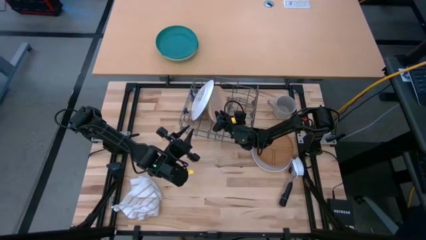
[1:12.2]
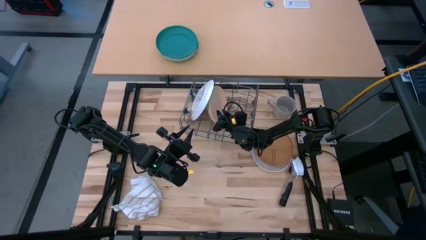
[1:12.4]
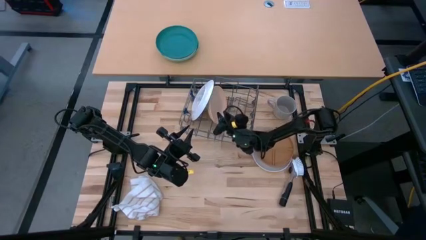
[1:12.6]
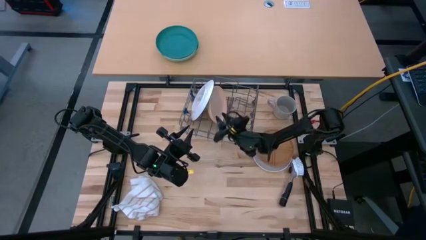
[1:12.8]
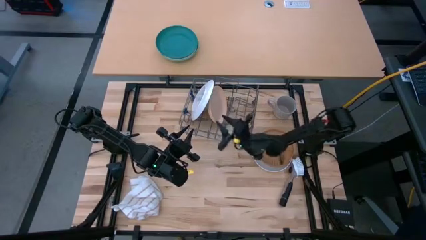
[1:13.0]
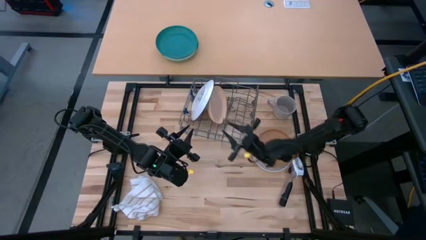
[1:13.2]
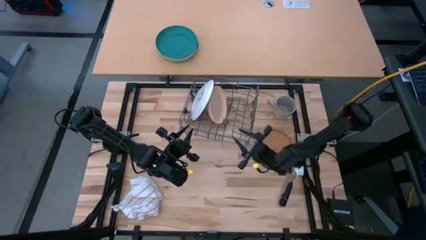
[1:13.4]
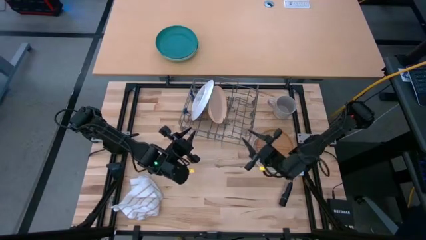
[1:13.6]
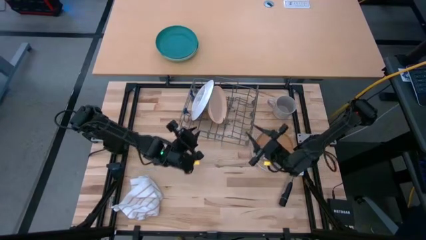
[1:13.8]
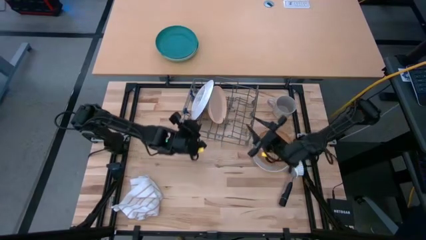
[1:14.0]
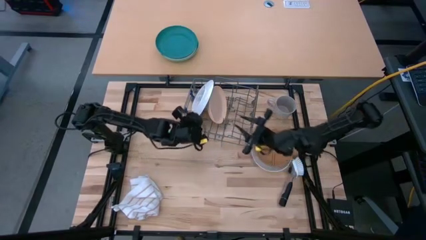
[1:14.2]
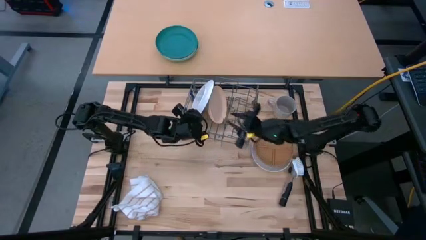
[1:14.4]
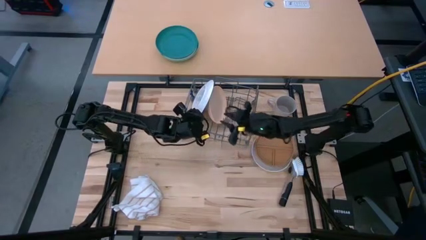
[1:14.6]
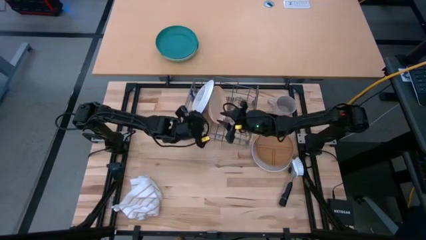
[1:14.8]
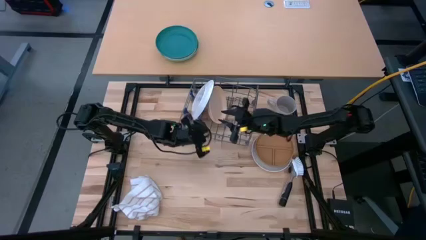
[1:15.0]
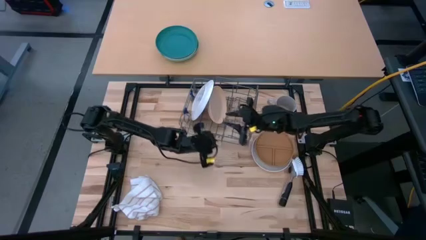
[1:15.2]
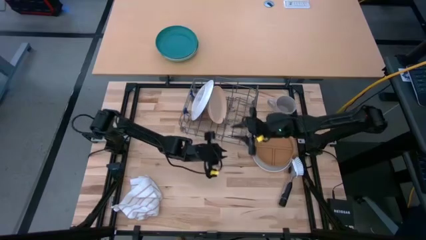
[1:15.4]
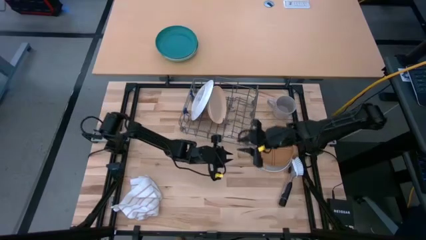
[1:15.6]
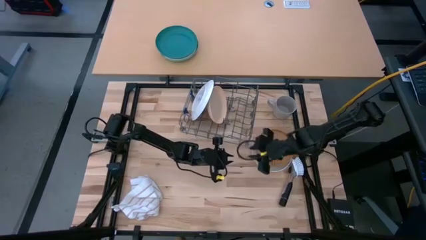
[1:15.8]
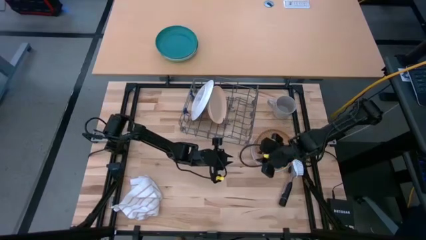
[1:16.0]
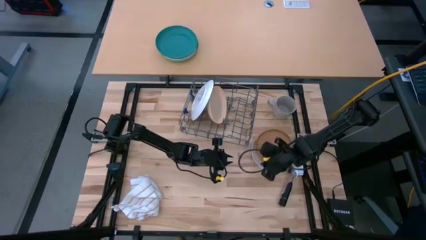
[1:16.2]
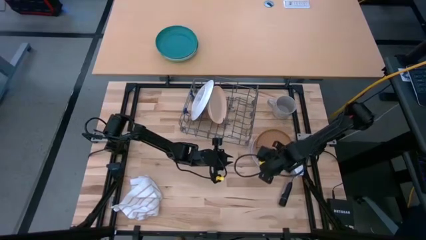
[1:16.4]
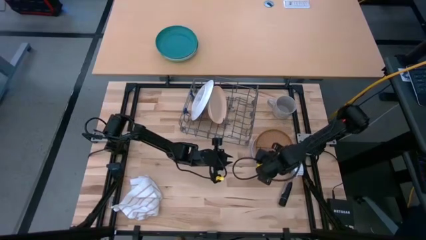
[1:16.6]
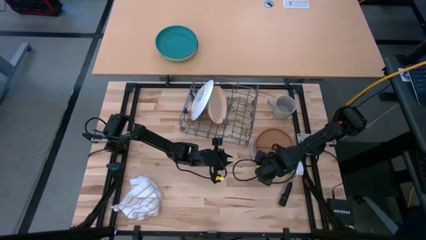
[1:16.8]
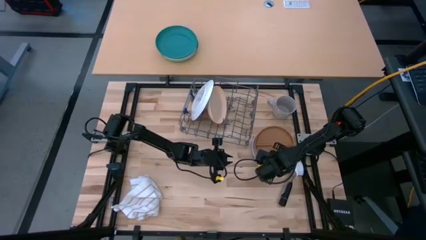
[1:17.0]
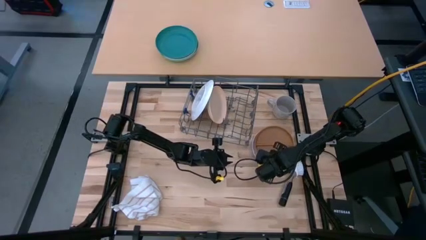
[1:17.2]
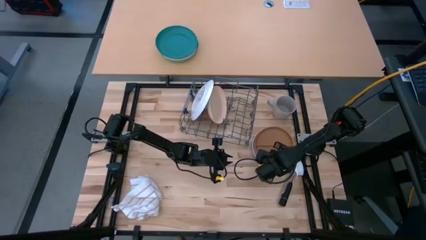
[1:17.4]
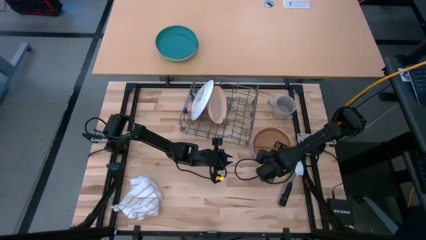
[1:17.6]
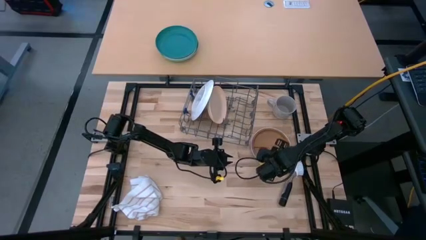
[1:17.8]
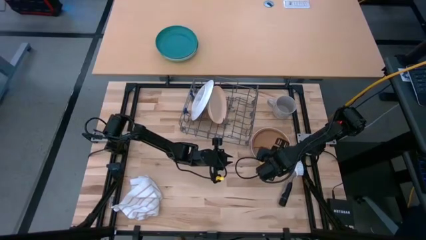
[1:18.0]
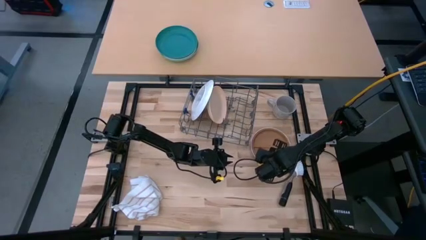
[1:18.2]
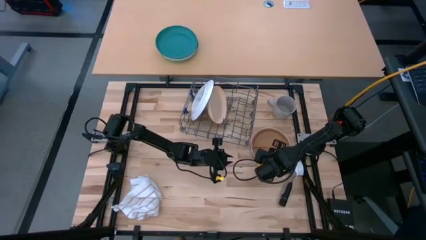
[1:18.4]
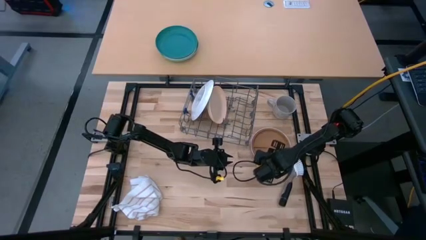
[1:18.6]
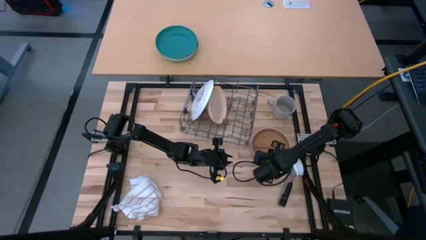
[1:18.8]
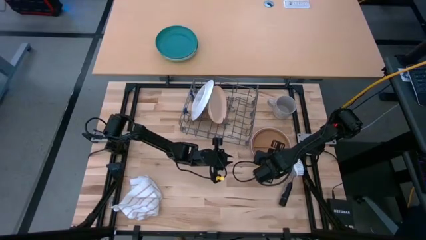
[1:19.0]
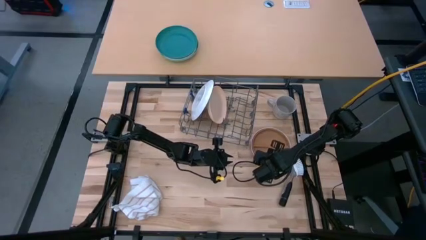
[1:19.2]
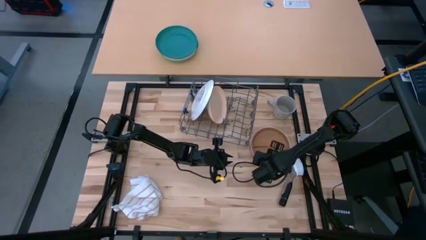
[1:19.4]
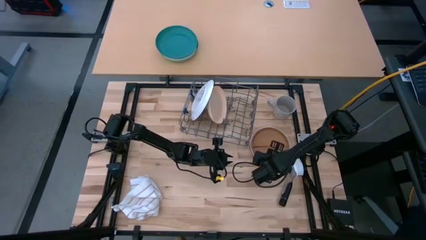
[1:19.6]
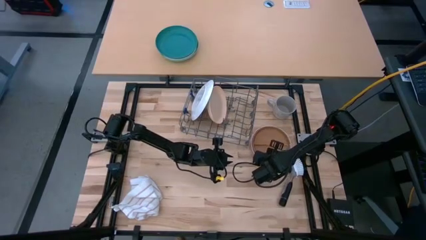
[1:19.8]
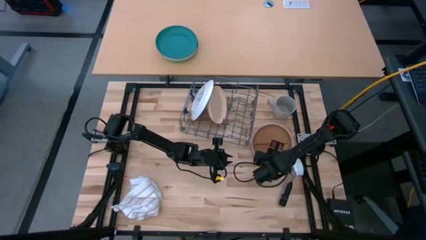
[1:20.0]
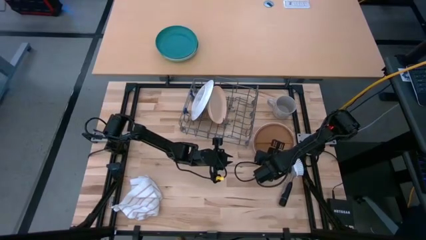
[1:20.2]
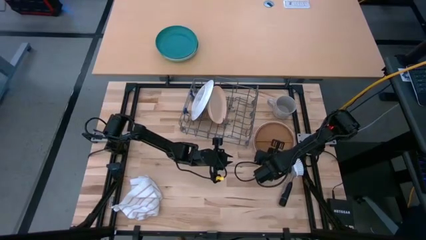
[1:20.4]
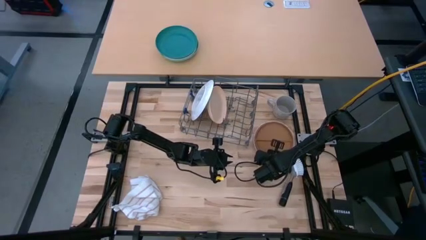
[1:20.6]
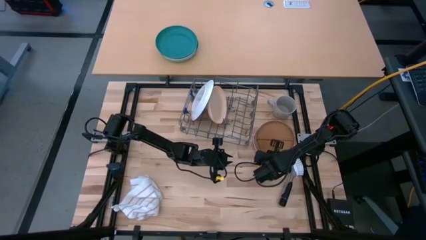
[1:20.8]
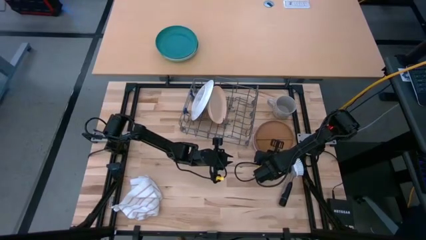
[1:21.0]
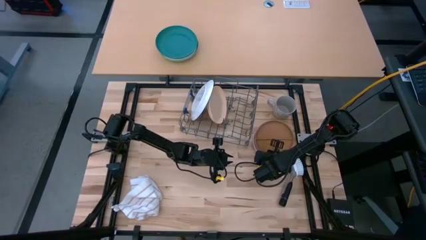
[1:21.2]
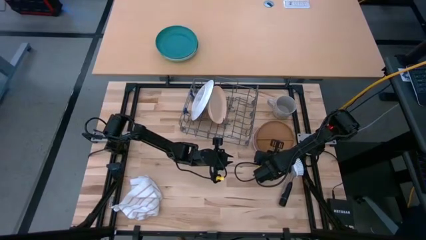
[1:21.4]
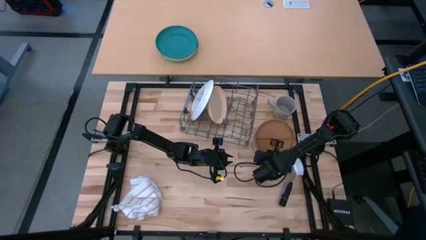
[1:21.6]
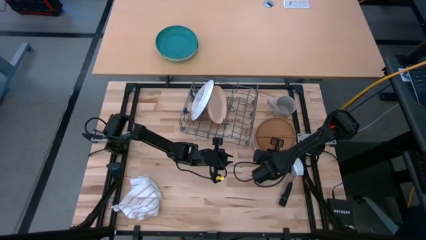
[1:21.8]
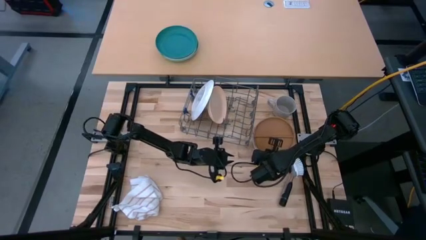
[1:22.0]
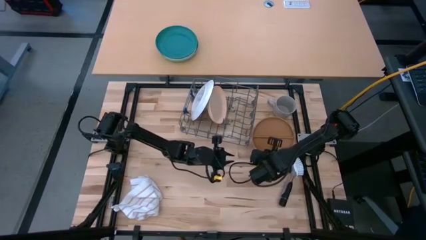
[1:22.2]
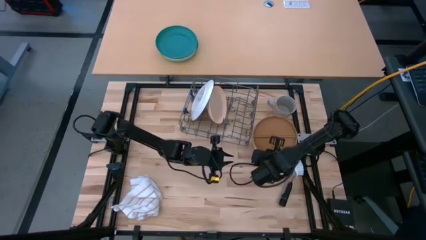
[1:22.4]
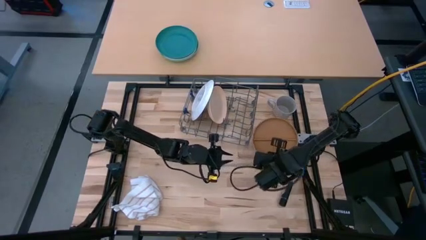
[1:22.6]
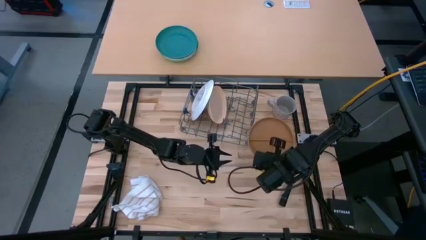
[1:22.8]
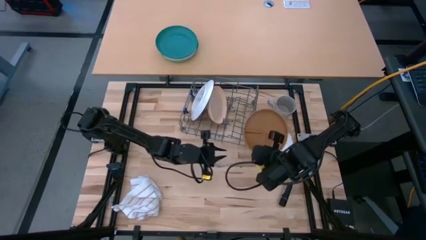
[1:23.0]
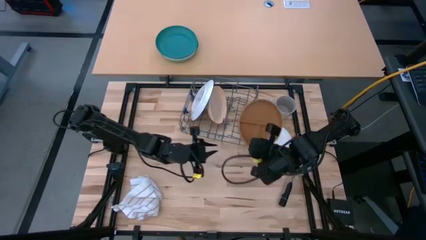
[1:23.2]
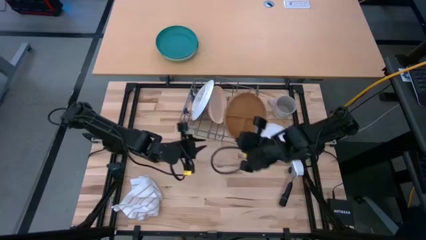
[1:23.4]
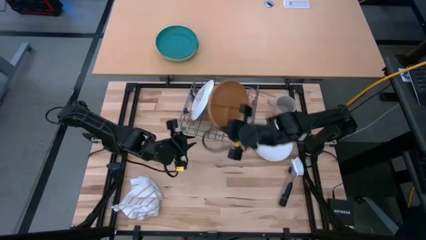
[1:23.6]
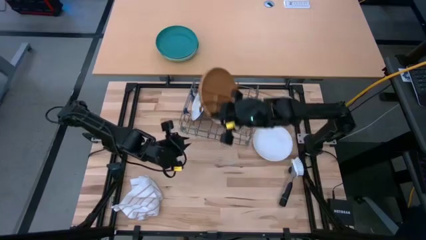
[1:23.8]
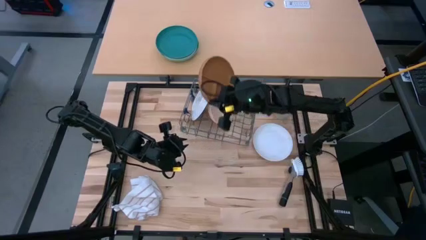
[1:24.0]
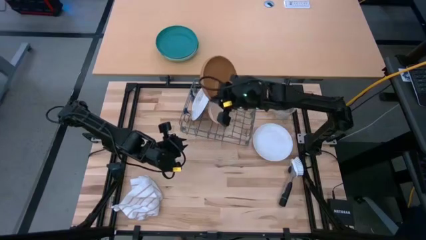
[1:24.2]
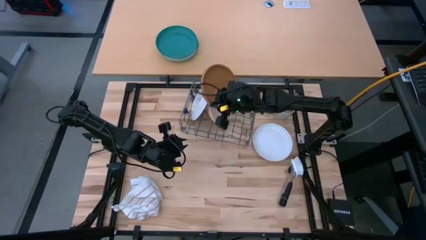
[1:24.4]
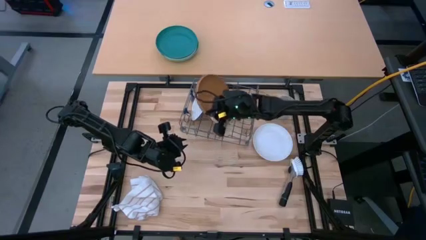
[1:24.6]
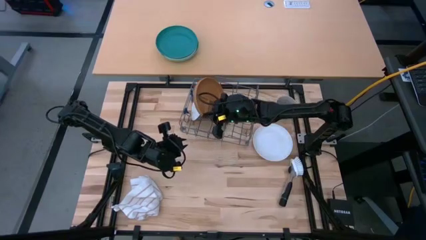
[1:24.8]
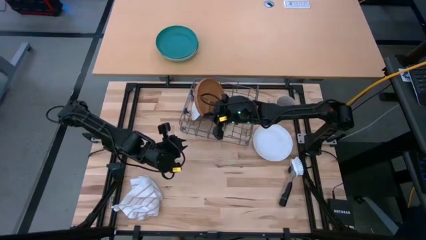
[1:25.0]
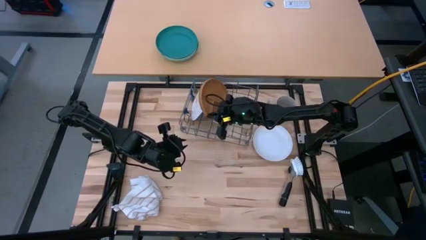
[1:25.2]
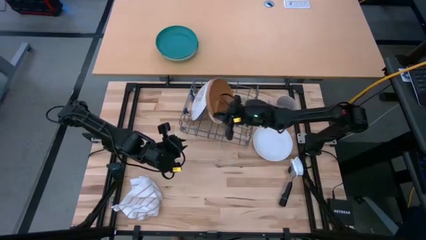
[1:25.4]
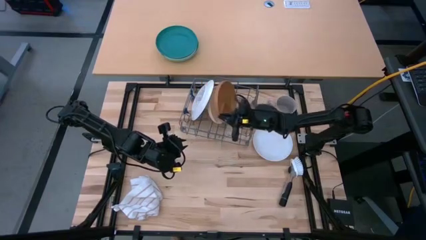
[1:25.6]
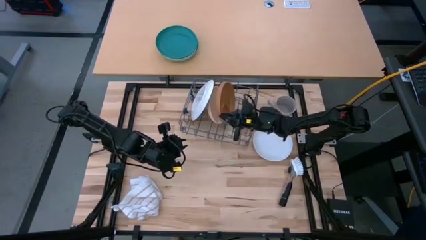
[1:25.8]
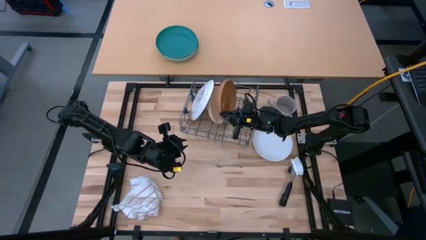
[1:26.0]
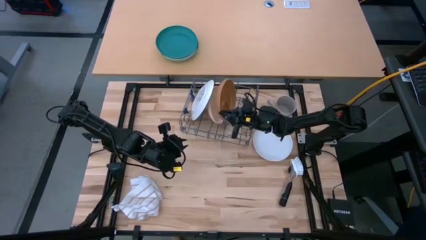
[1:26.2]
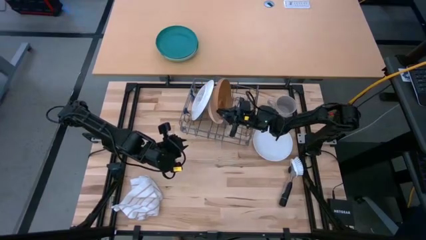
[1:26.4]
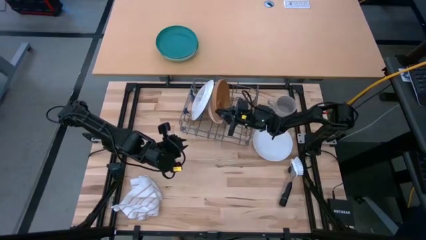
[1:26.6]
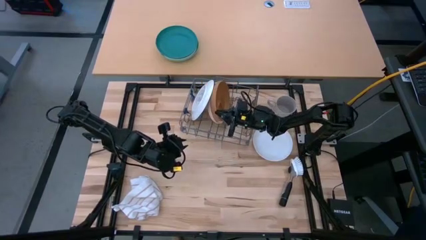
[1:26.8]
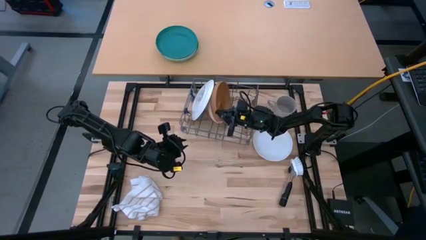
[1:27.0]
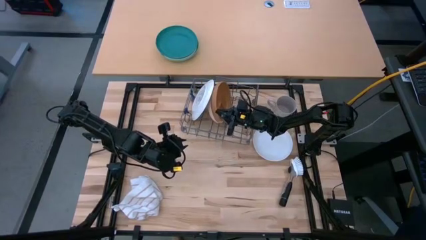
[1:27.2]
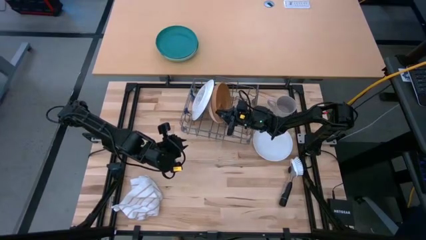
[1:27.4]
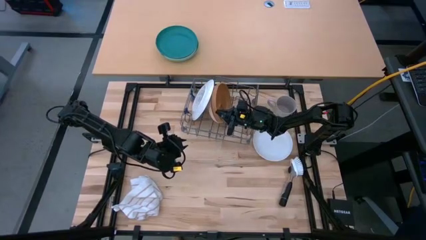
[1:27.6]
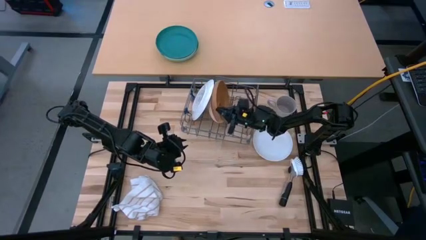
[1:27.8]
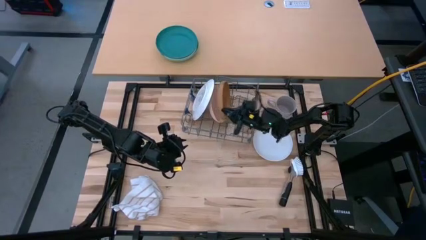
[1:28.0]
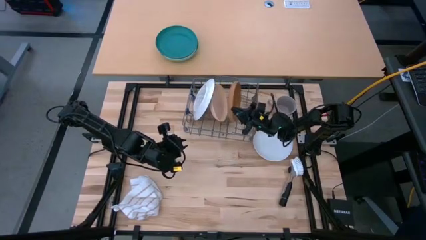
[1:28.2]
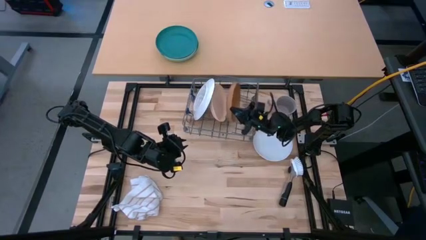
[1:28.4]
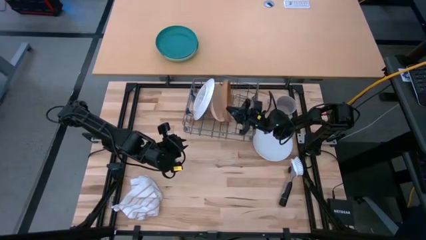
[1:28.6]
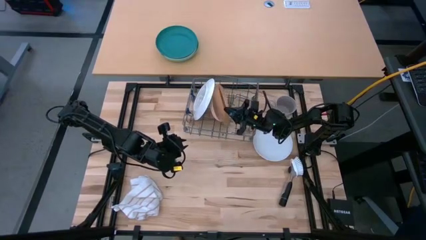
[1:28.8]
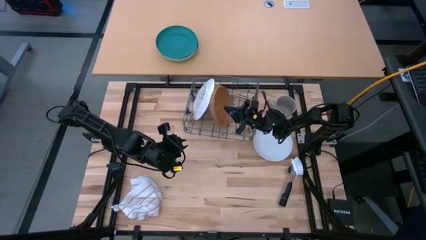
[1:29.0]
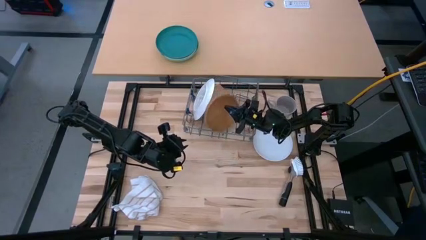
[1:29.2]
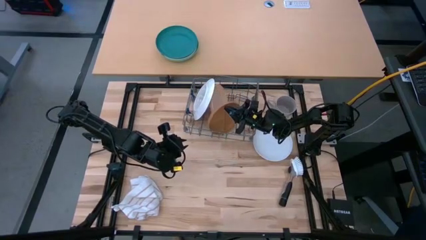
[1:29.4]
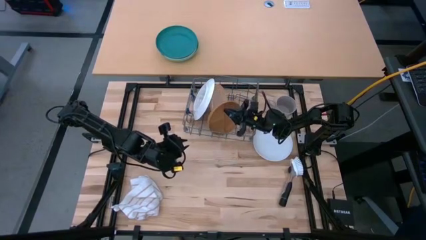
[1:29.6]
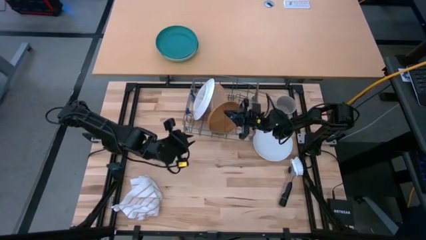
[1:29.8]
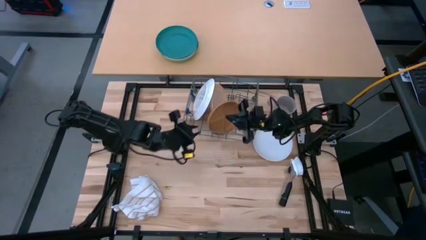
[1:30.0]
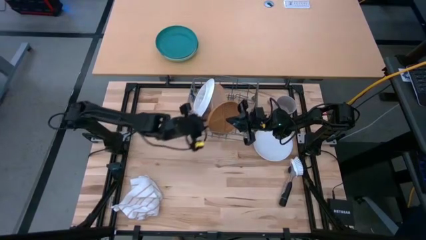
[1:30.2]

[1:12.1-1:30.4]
Task: Sort dishes
Put the brown plate in the dish rack
